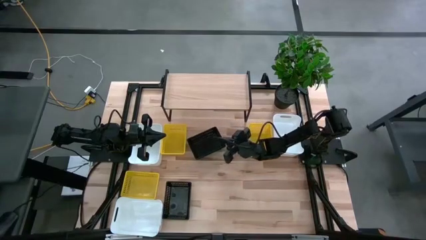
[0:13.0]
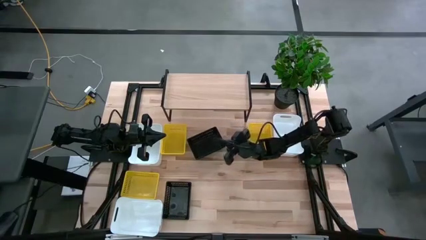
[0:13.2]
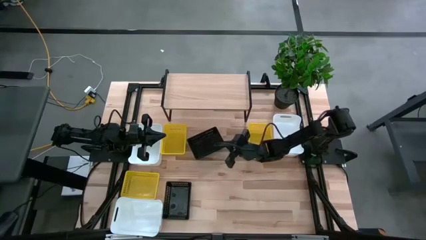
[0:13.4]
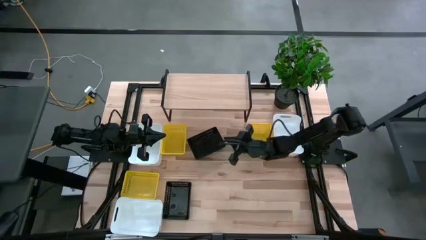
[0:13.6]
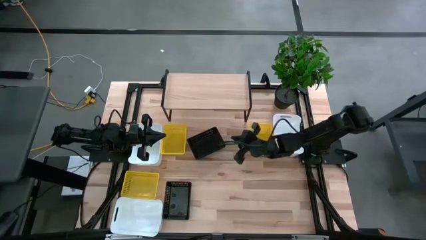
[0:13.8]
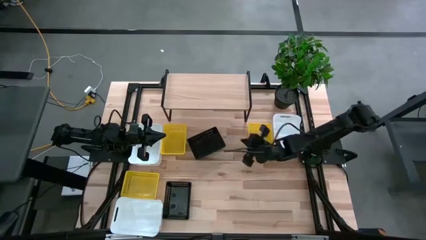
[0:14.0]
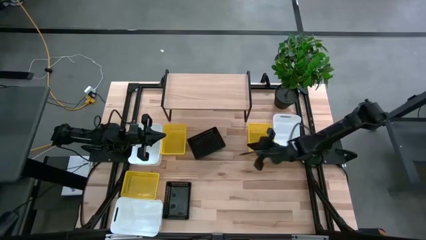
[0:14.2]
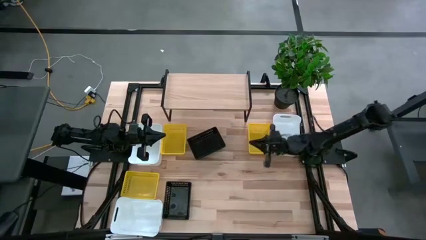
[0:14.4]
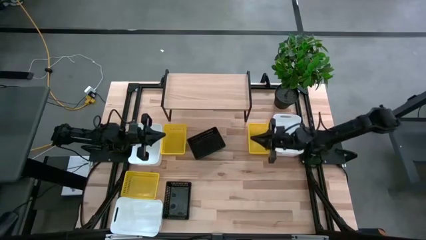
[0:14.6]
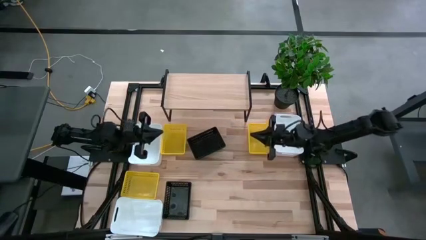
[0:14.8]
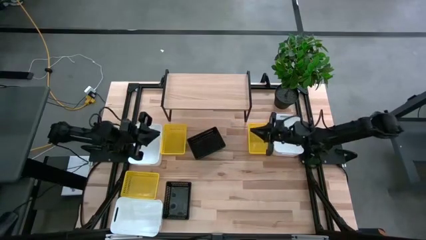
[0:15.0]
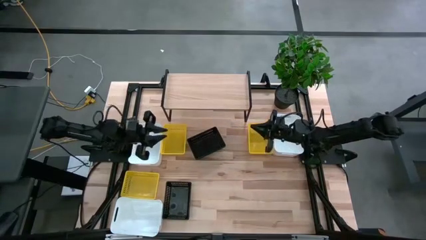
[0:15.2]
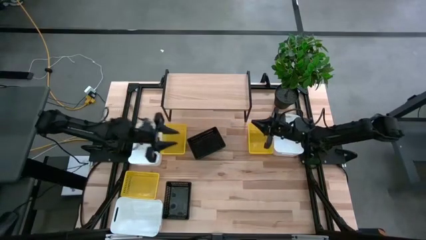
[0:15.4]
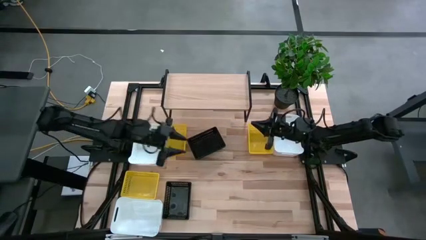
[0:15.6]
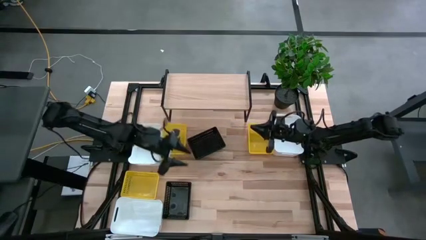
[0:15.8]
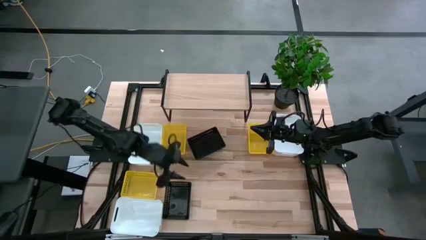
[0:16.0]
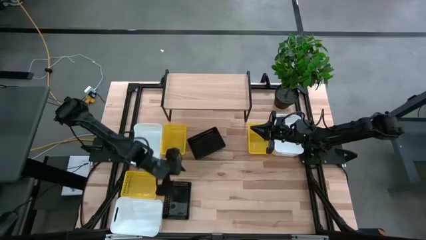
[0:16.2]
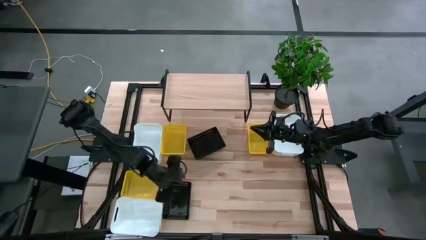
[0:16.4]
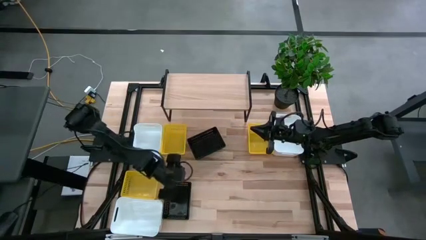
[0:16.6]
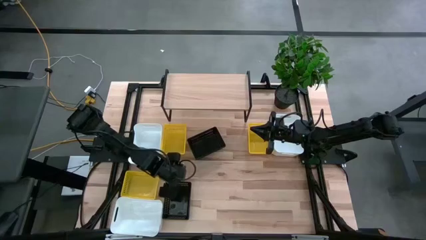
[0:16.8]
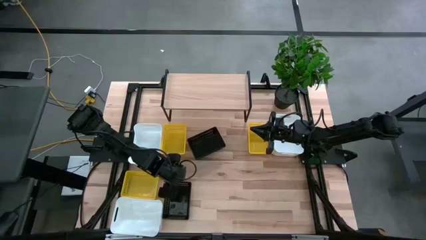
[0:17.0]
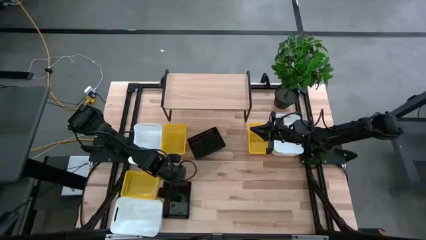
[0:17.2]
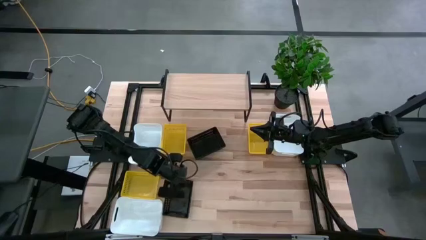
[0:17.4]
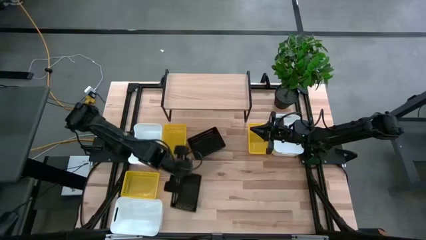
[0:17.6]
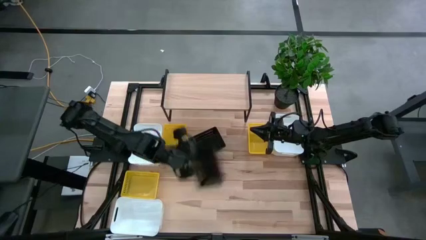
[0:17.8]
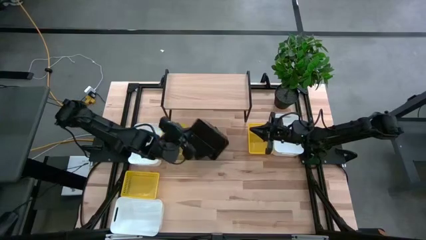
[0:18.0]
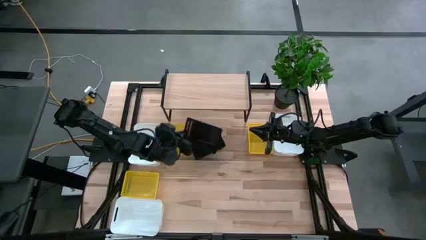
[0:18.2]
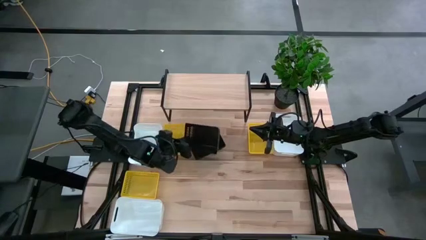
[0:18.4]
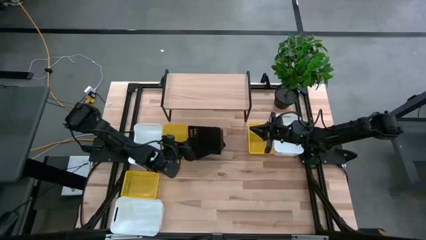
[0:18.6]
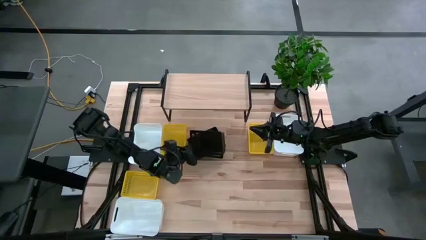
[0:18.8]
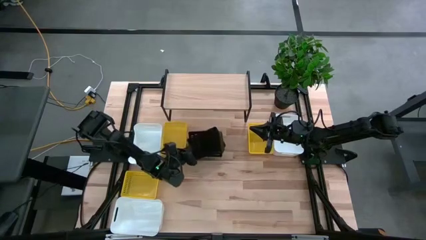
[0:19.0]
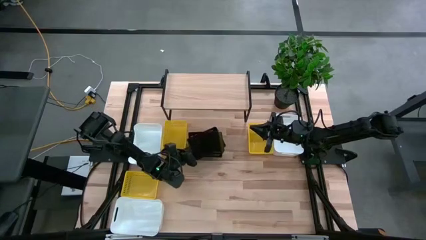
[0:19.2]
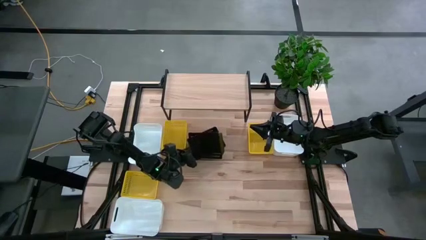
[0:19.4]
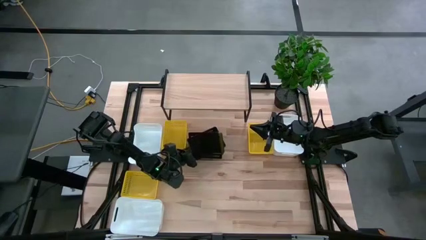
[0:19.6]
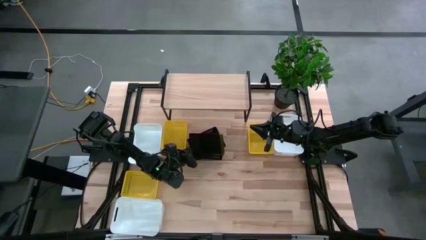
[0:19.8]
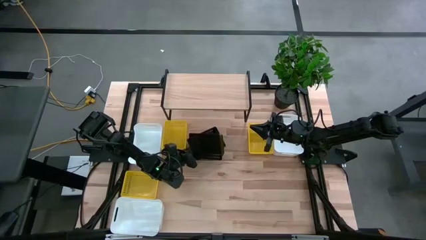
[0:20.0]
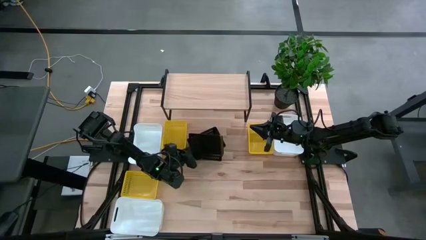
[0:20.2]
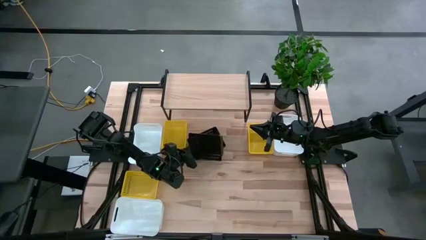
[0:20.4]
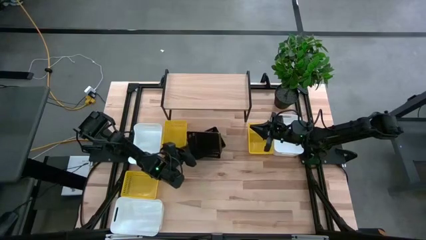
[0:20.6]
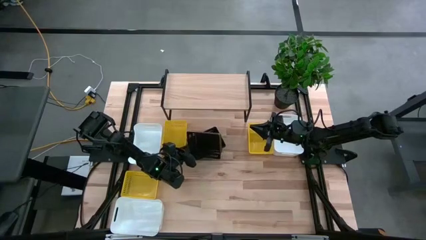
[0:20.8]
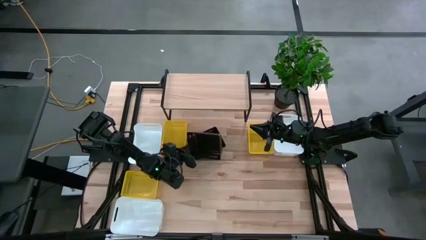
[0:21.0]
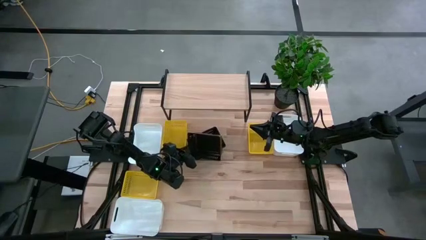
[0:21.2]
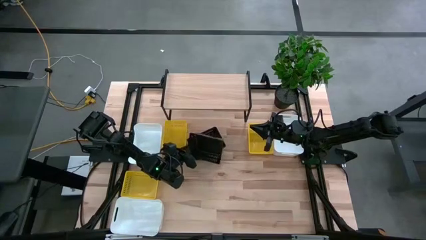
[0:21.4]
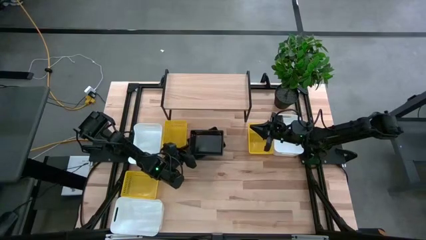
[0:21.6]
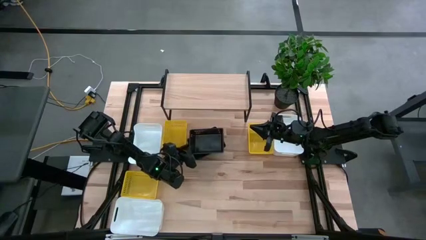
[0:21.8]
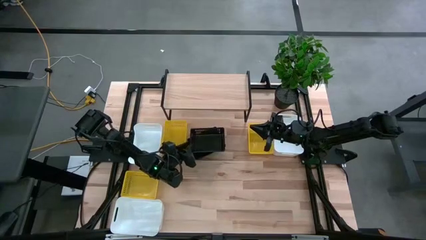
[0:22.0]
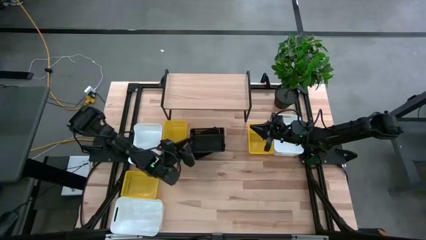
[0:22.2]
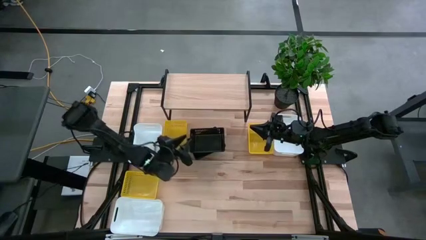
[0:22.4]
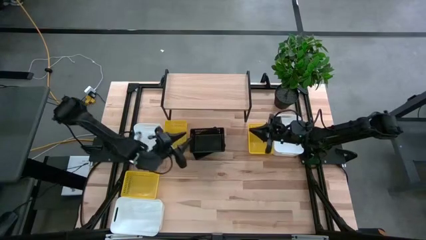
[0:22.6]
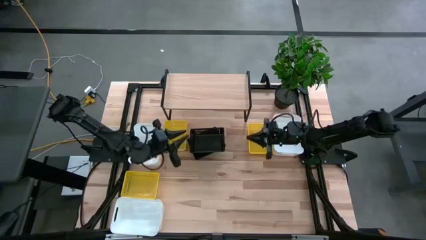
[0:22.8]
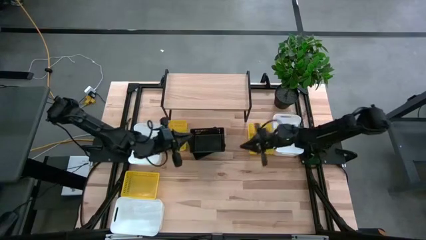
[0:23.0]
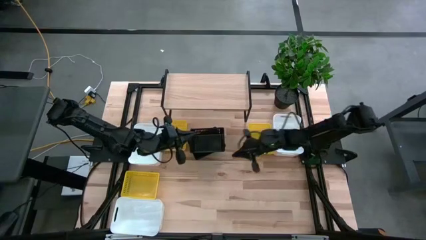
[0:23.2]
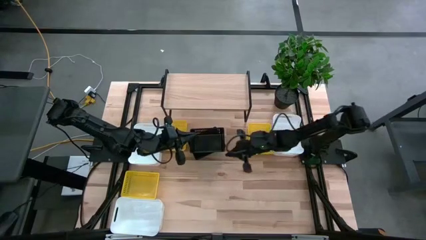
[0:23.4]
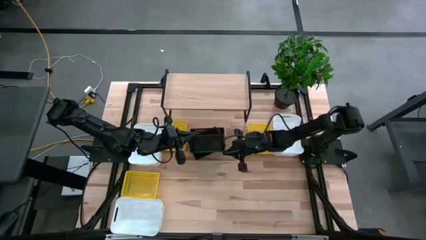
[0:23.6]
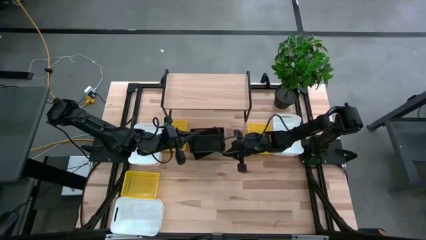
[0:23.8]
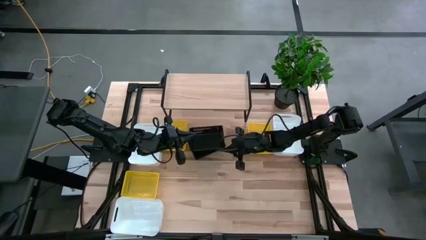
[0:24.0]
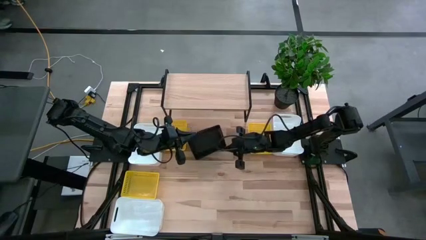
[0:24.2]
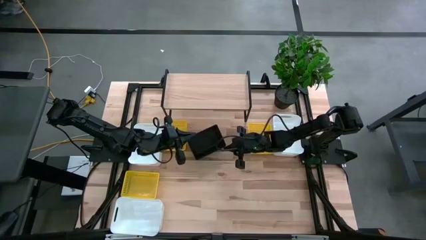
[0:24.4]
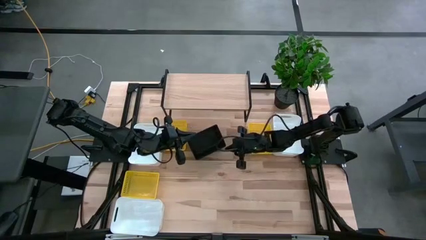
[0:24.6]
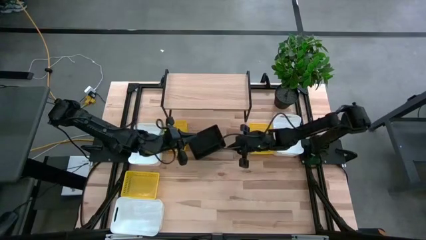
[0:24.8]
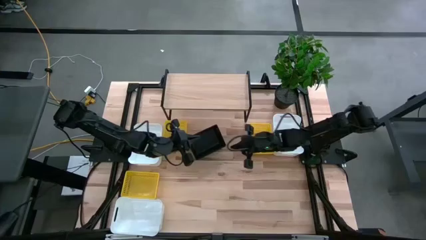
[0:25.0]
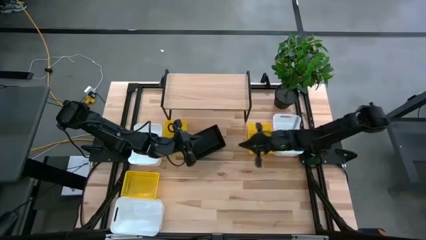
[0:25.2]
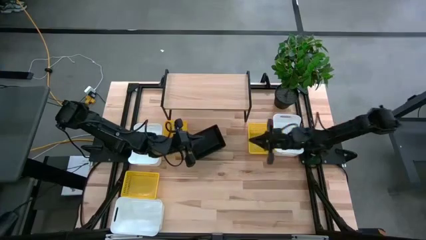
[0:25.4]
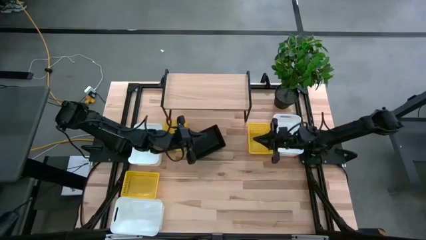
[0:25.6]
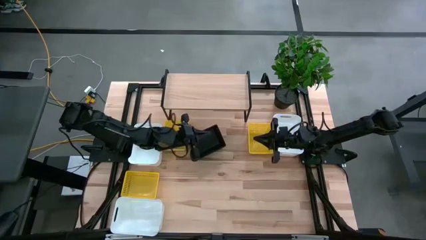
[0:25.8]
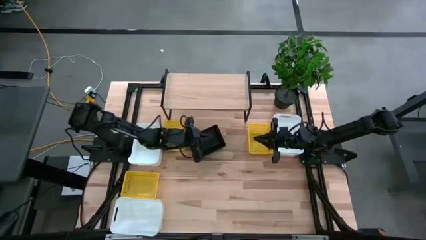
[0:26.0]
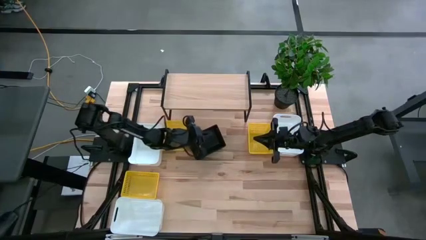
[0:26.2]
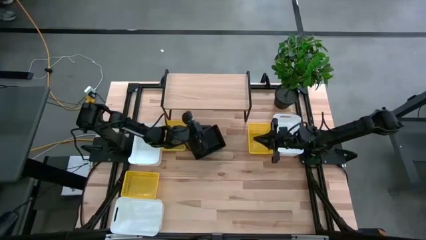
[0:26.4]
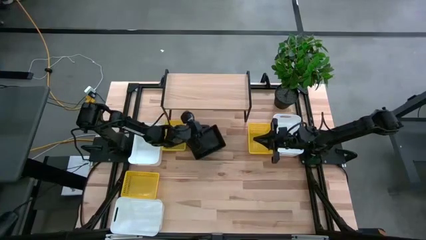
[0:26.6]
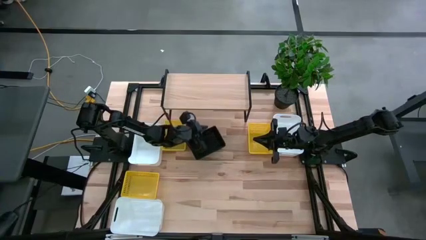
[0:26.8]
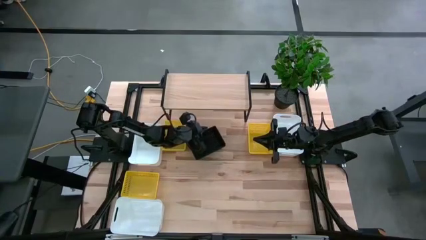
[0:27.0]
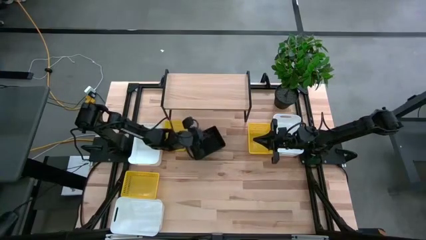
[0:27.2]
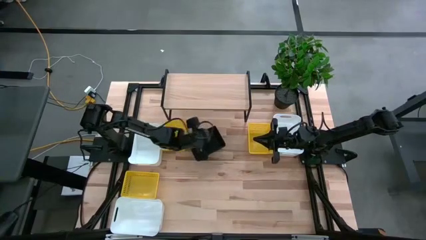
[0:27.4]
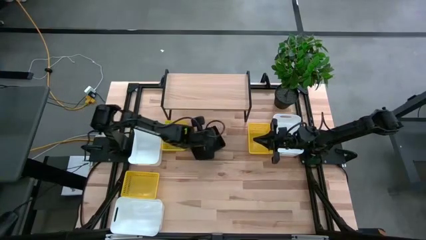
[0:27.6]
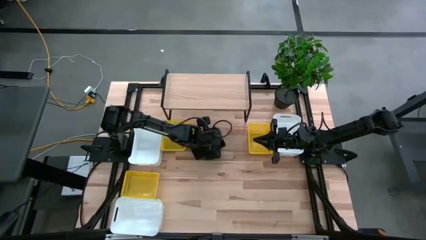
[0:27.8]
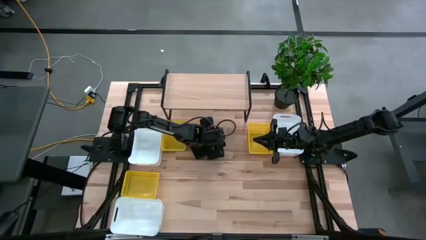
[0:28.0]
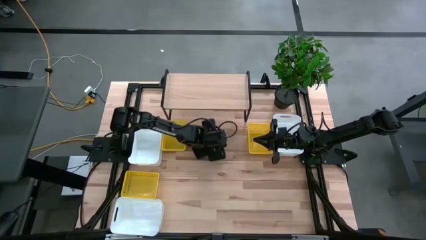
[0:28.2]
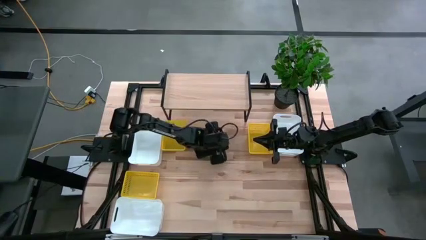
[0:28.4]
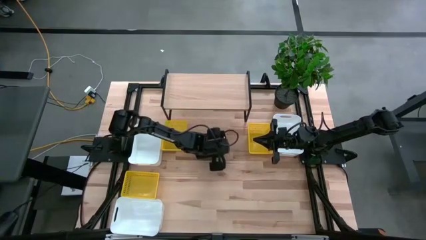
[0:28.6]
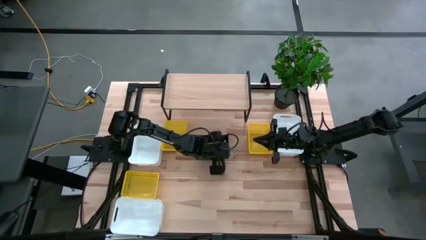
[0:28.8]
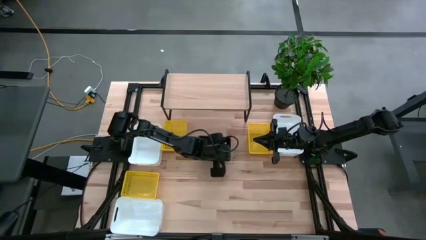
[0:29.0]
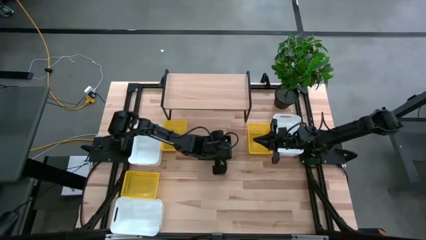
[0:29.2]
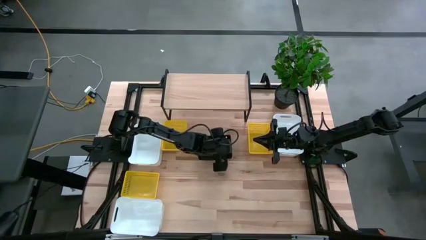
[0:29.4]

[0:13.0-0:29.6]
Task: Stack baskets on shelf by color
Stack the bottom black bin on the top black bins
